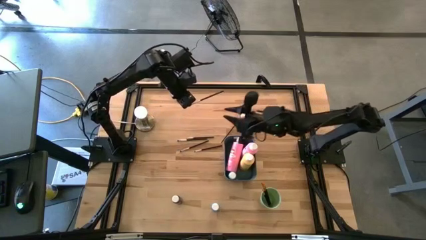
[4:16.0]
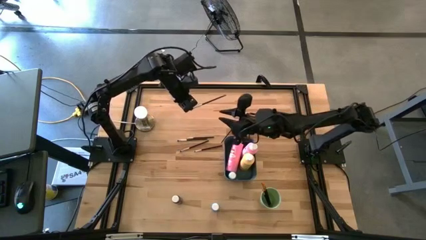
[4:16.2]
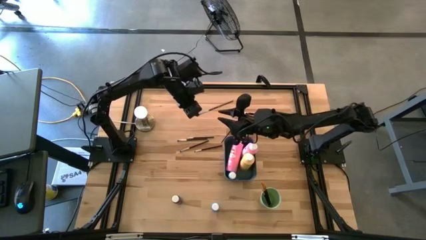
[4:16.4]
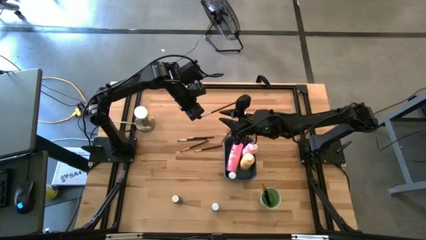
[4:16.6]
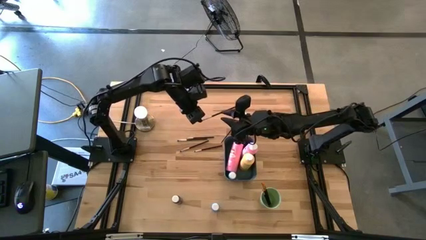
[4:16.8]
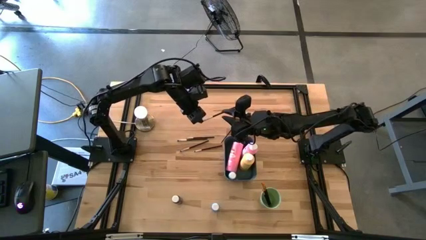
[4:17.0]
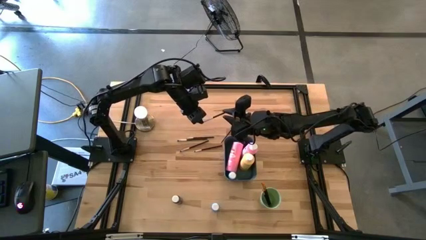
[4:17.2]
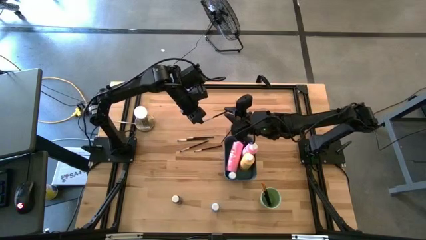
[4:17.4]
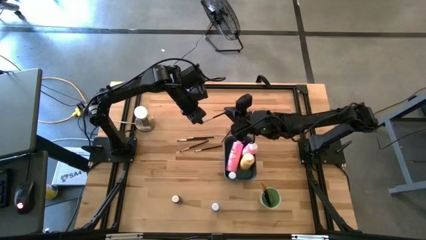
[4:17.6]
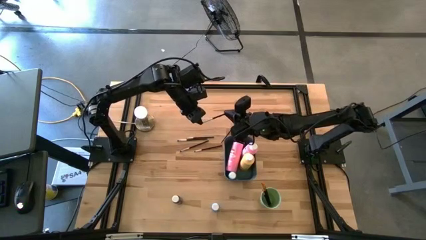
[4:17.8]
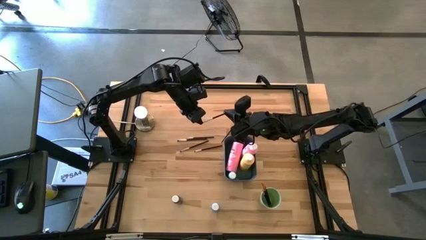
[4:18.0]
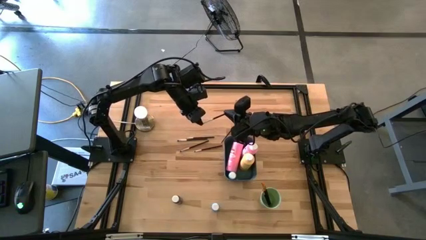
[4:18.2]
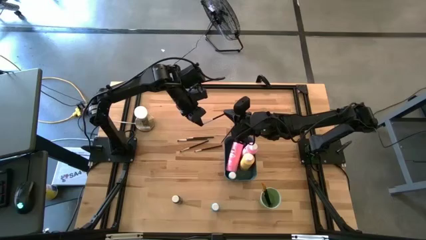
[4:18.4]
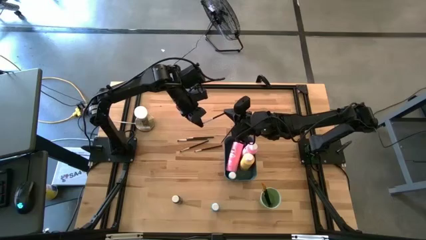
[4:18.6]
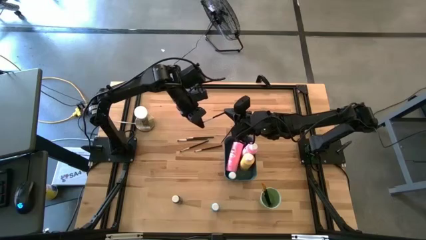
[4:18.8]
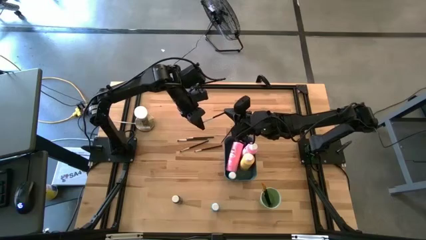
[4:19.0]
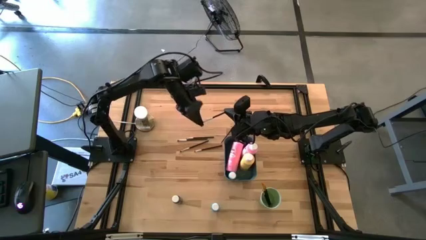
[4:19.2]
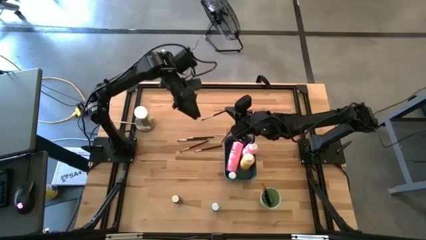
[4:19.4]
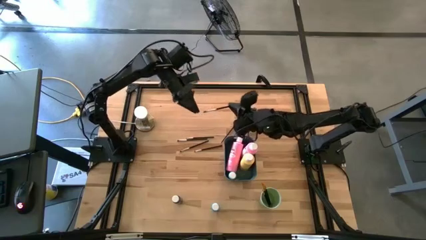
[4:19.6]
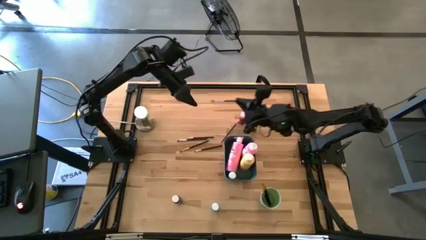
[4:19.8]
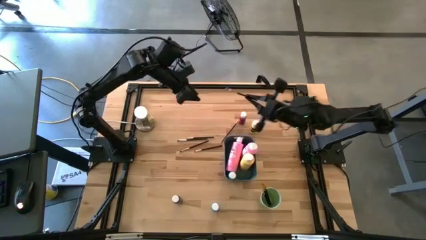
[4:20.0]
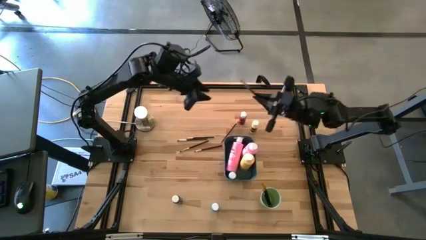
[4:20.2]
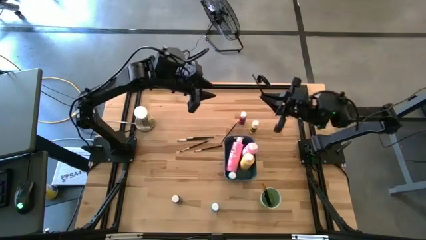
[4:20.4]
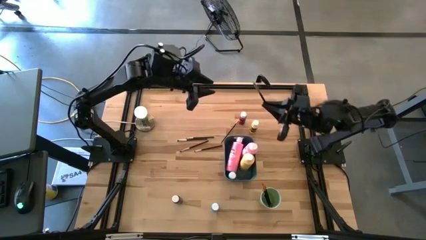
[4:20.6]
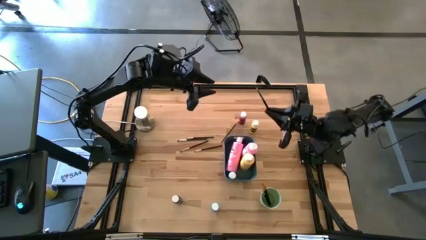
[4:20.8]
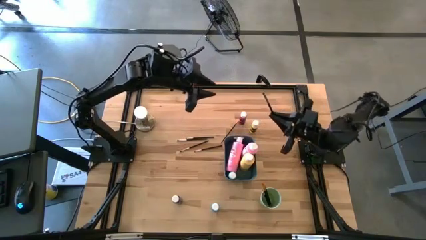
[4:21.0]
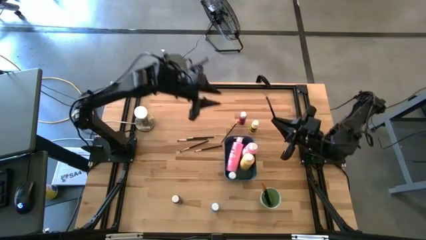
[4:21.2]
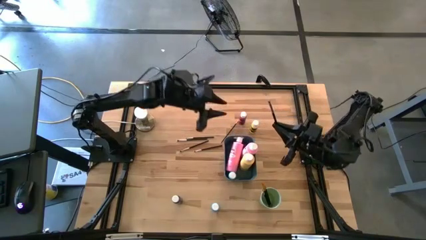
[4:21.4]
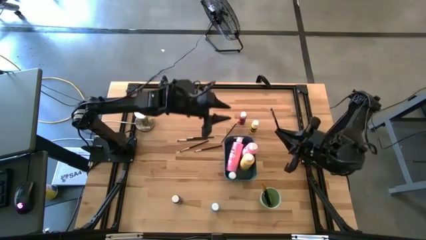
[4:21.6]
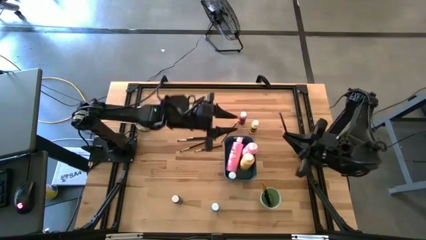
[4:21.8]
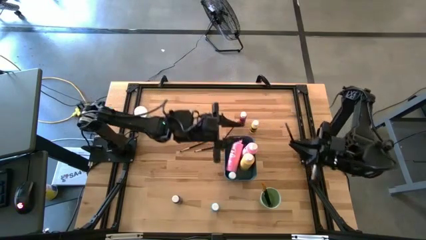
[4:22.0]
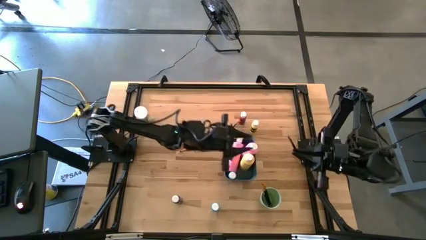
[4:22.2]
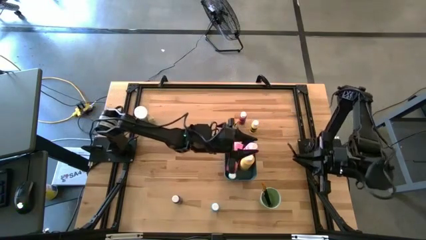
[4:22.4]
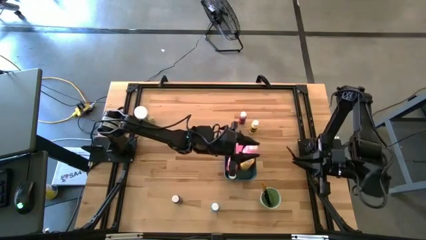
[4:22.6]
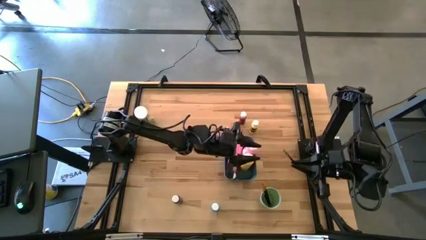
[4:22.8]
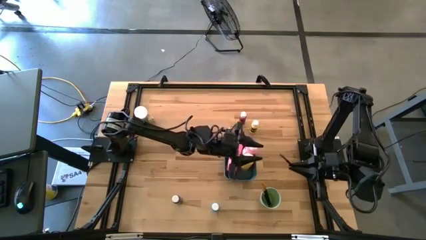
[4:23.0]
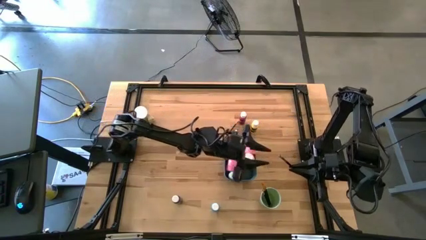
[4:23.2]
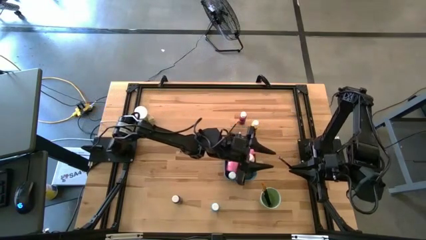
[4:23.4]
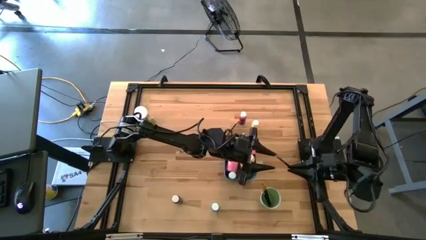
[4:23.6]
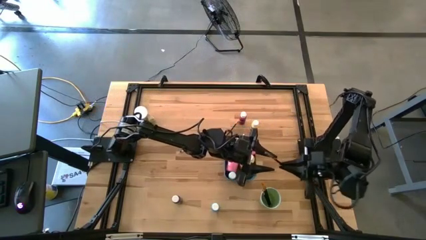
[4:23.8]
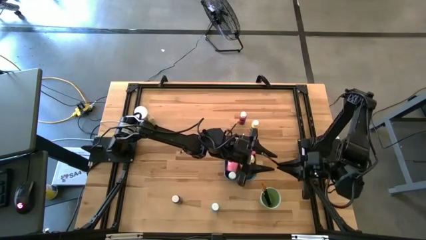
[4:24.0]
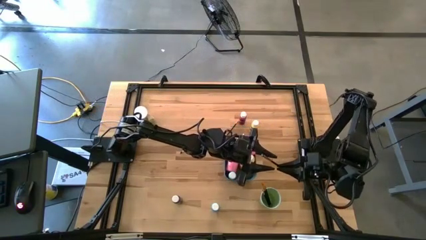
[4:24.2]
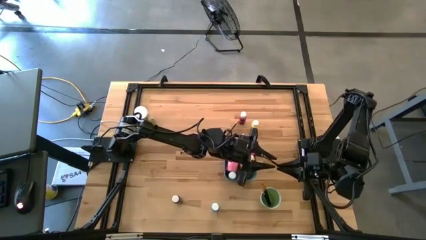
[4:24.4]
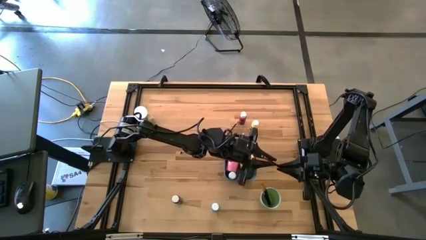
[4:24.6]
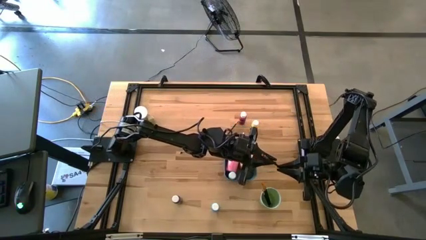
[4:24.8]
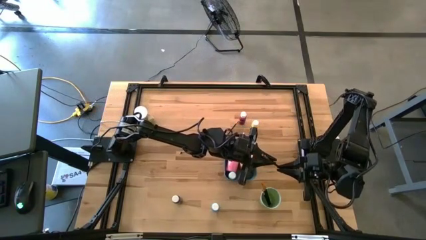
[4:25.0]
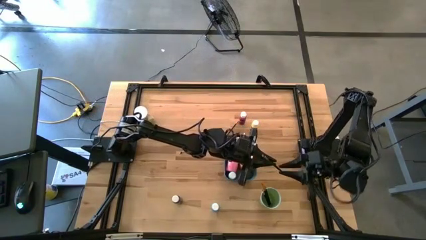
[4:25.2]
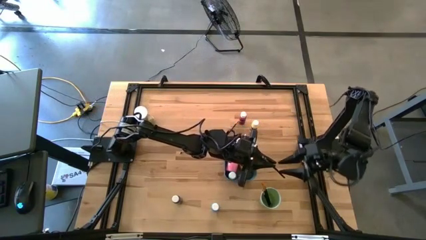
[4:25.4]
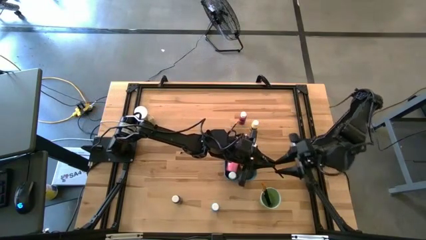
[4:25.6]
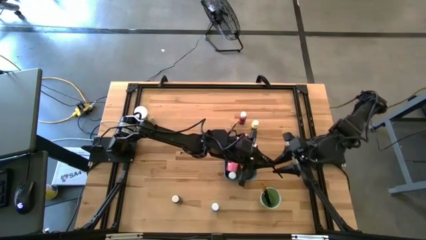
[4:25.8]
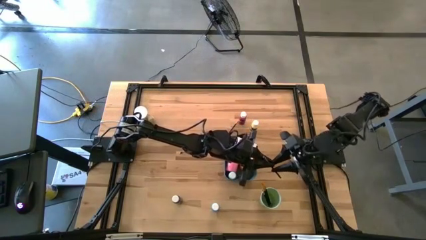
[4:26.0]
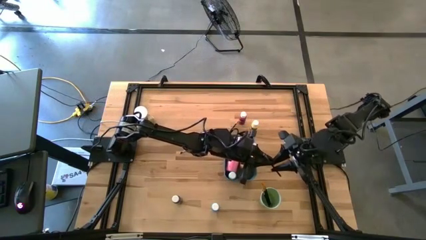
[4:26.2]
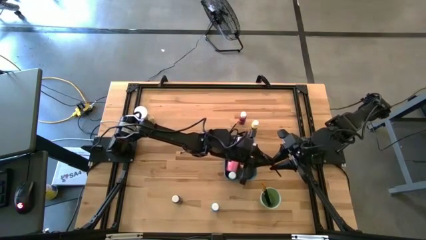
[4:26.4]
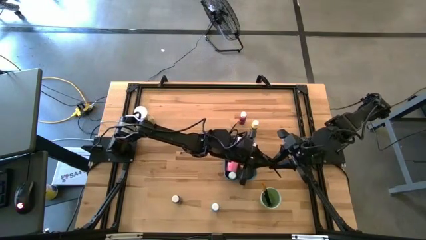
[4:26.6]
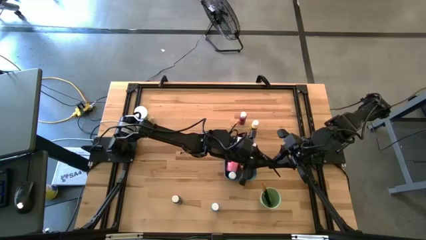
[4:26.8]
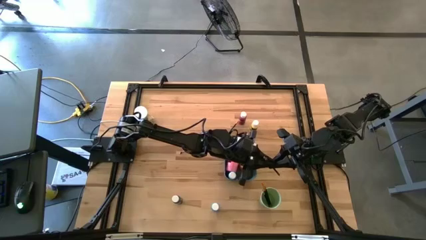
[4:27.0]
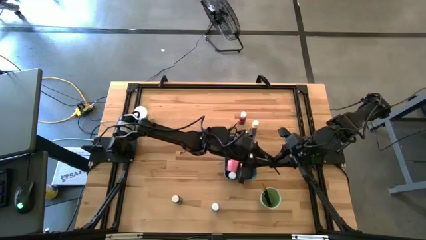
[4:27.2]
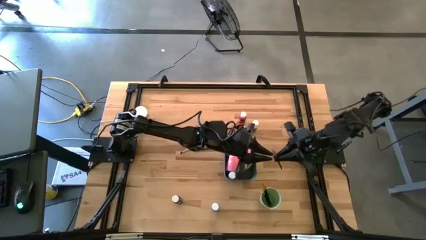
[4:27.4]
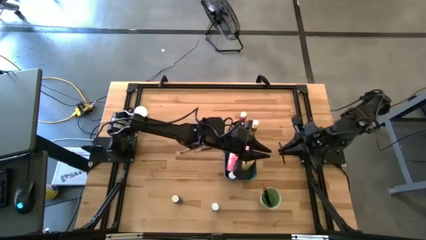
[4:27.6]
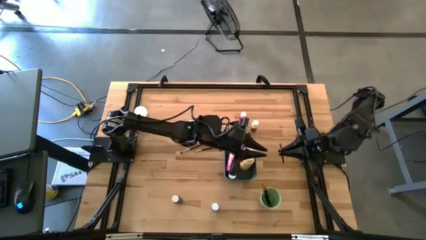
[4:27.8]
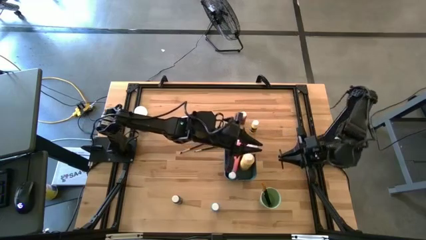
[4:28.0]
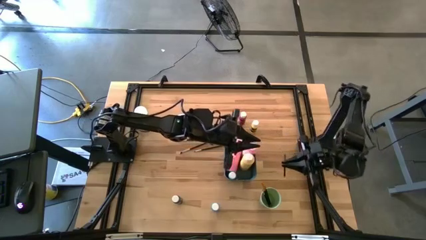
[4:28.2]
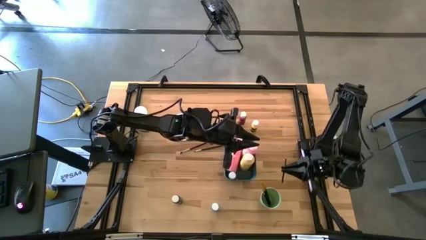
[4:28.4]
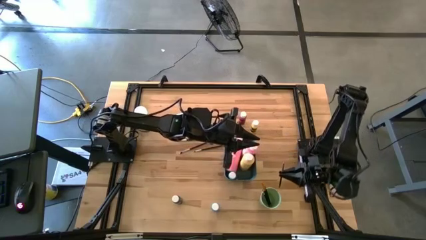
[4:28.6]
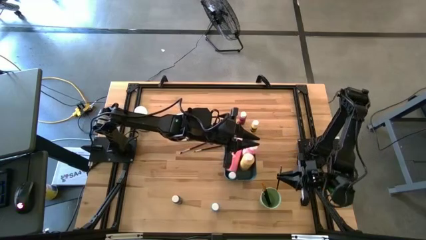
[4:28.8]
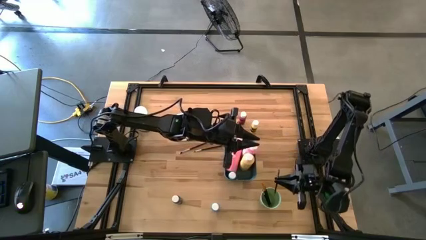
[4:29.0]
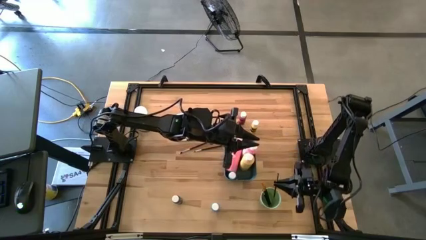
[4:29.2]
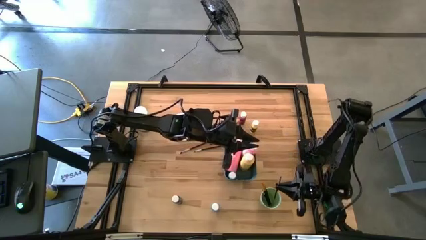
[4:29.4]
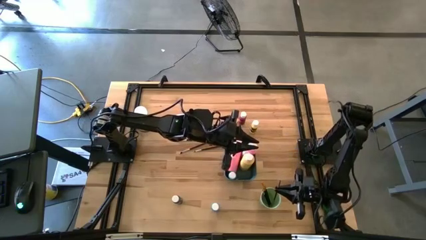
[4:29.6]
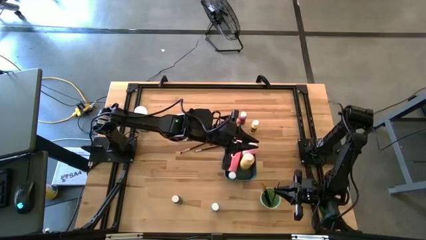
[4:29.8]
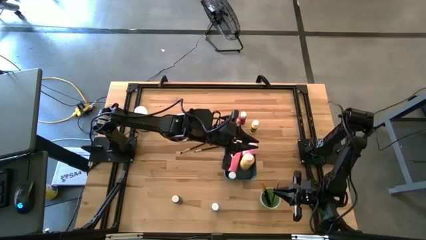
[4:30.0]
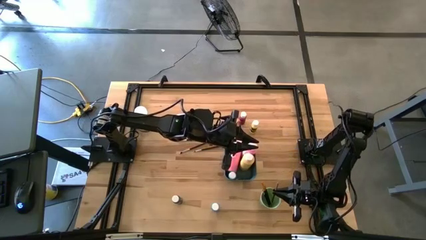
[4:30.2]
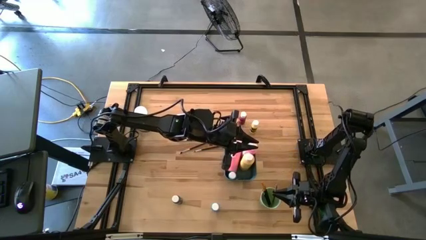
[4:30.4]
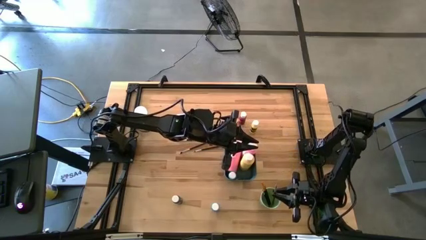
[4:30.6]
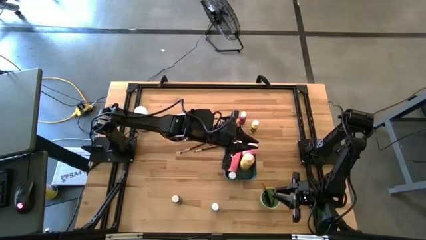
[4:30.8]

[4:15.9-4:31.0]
Task: Pick & Place Paint Supplies
Put the black and silver paint brush into the green cup
